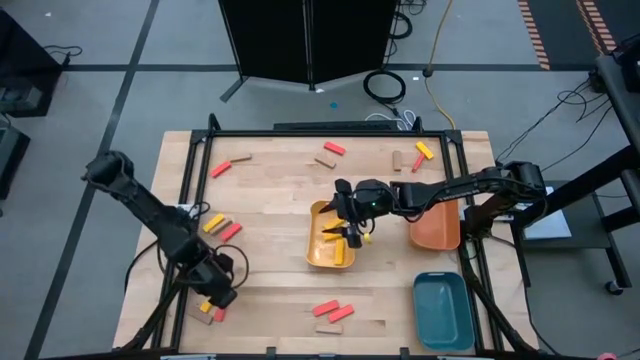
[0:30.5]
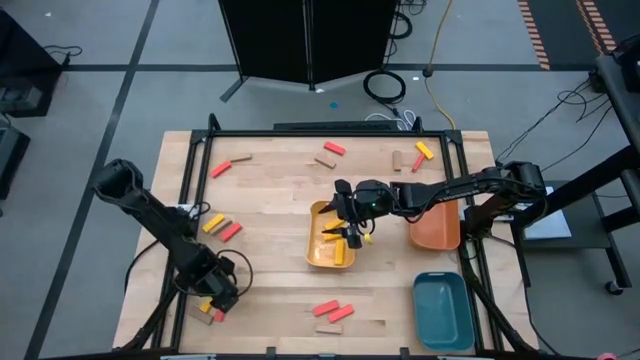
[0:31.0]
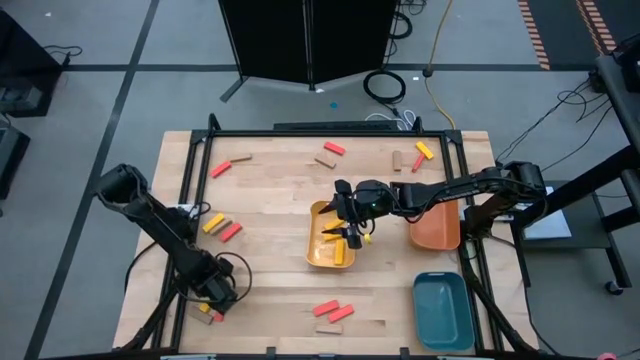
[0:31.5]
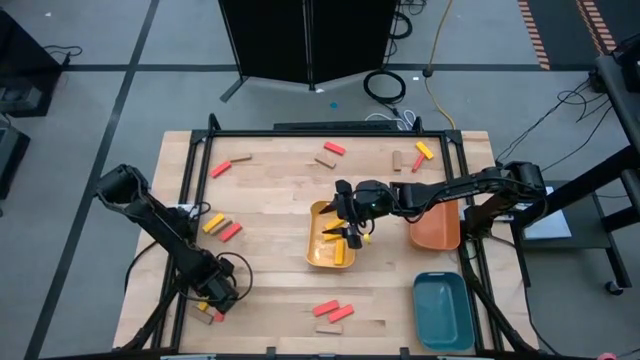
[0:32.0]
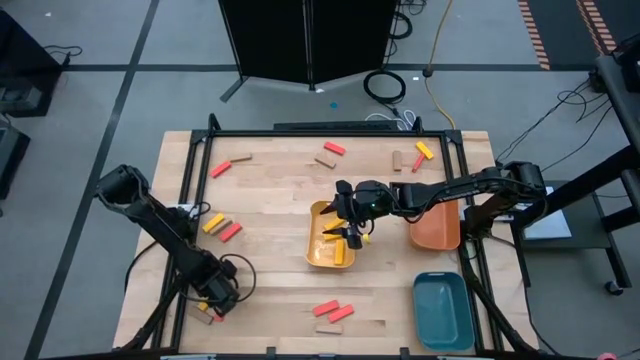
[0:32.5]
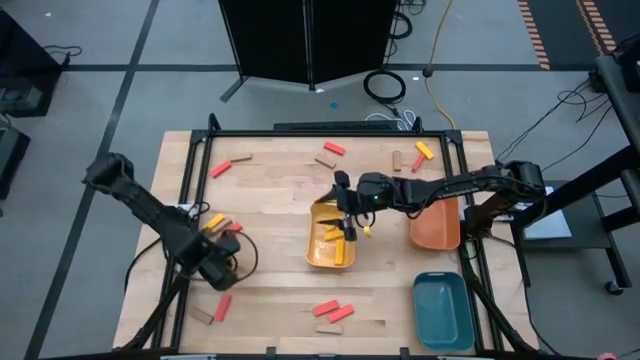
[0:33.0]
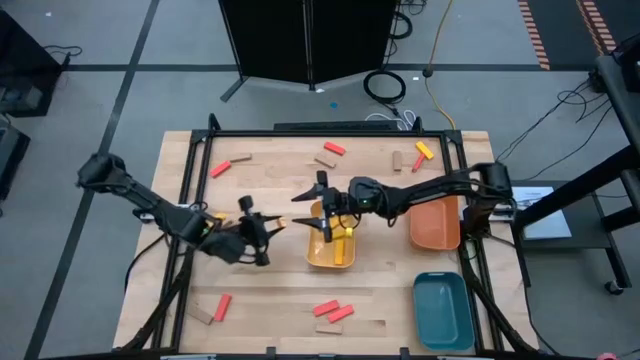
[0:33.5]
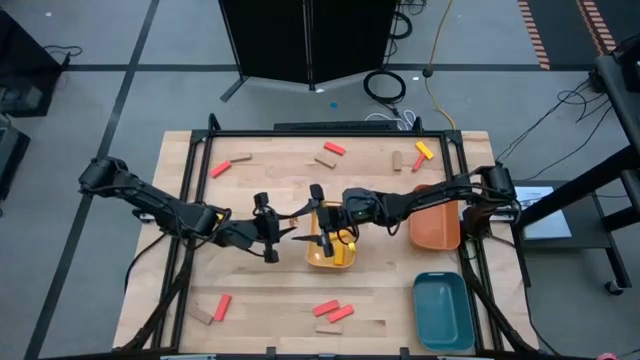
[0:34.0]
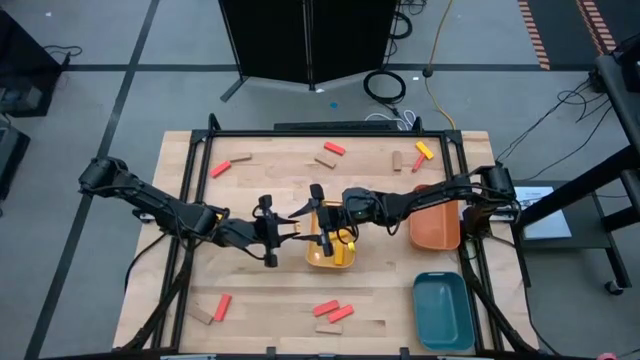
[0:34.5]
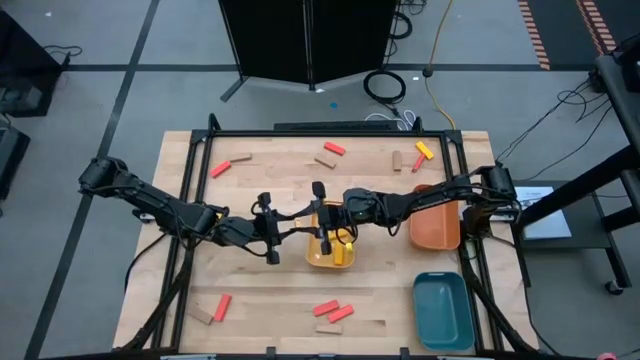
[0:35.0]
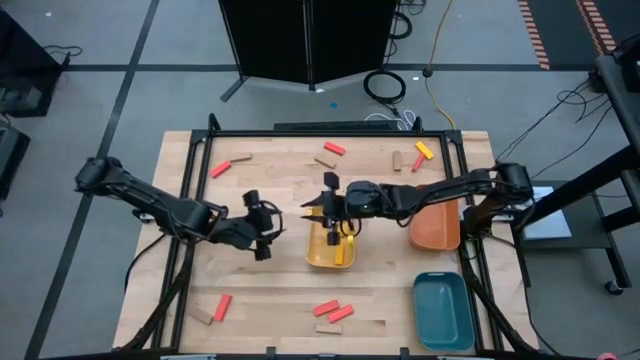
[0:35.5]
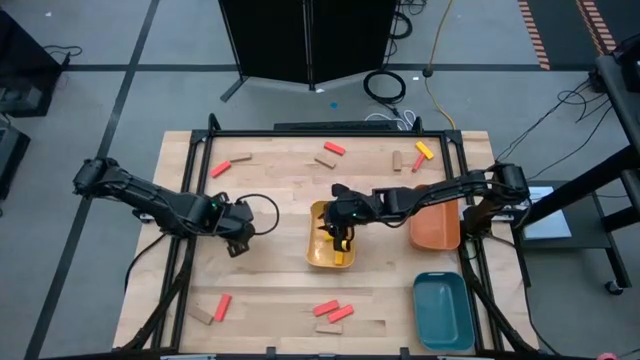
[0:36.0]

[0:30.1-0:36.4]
Task: Sort blocks
Put the yellow wooden block into the yellow bin

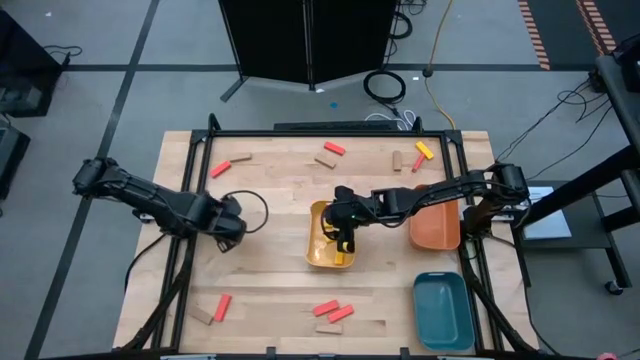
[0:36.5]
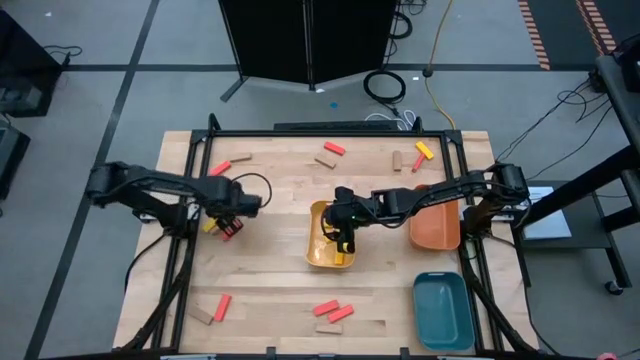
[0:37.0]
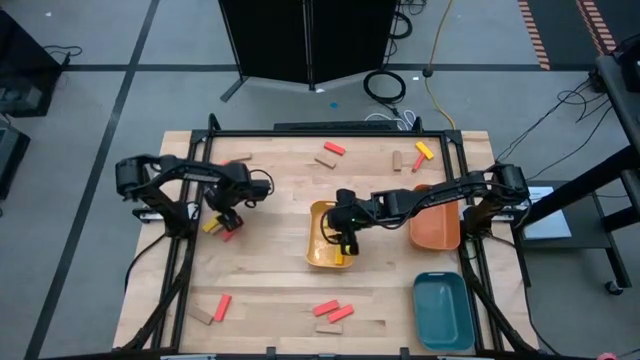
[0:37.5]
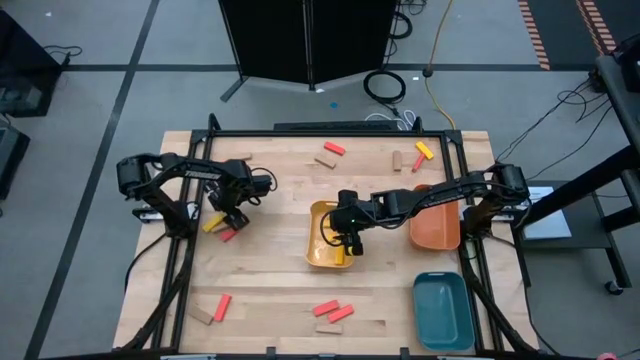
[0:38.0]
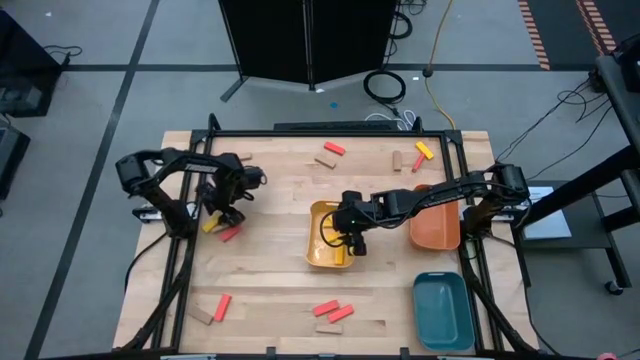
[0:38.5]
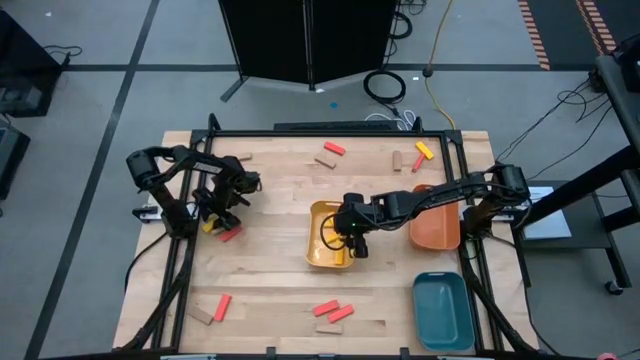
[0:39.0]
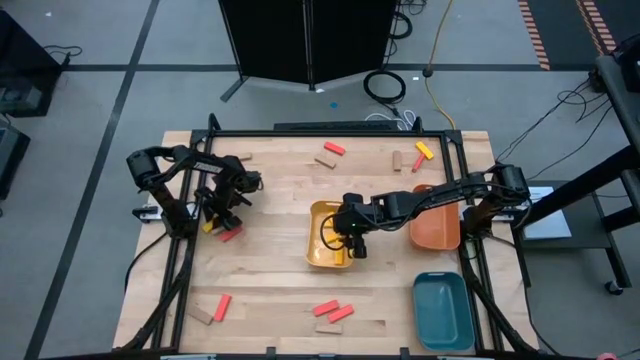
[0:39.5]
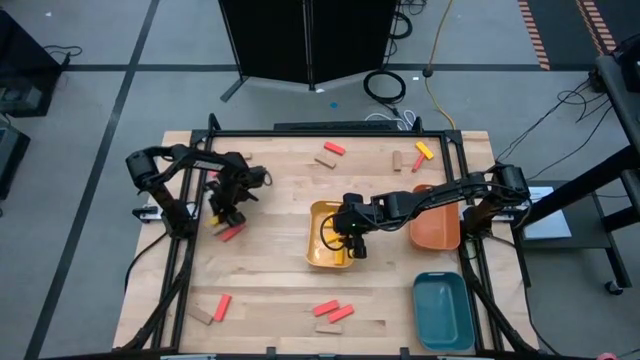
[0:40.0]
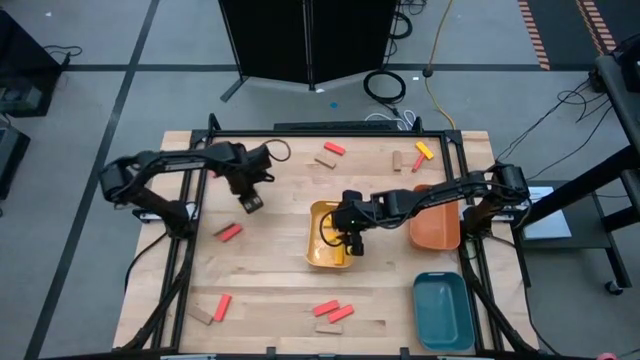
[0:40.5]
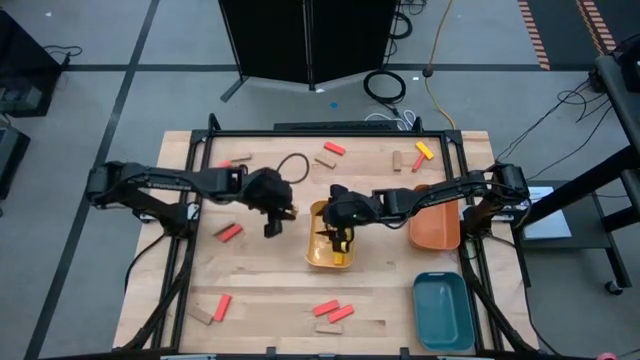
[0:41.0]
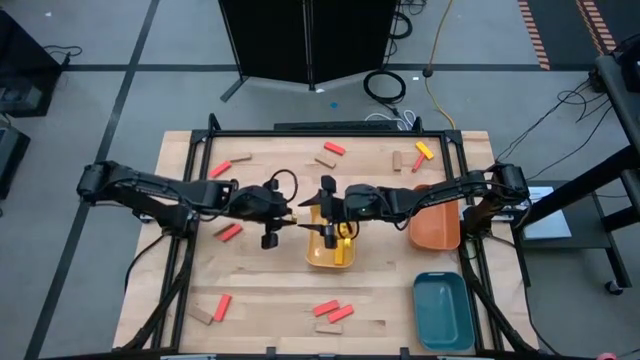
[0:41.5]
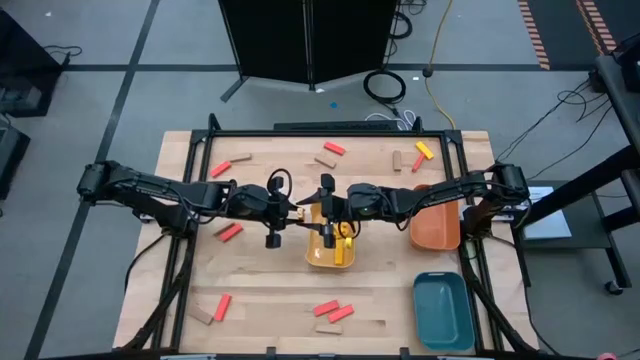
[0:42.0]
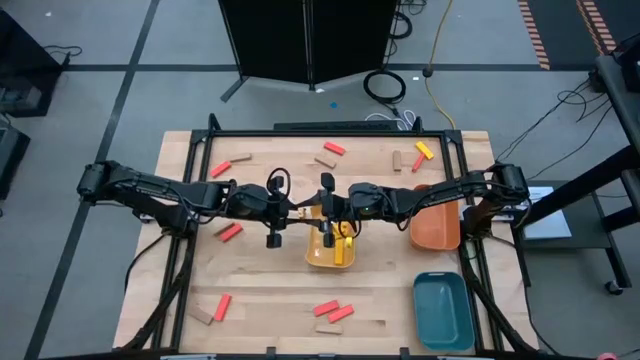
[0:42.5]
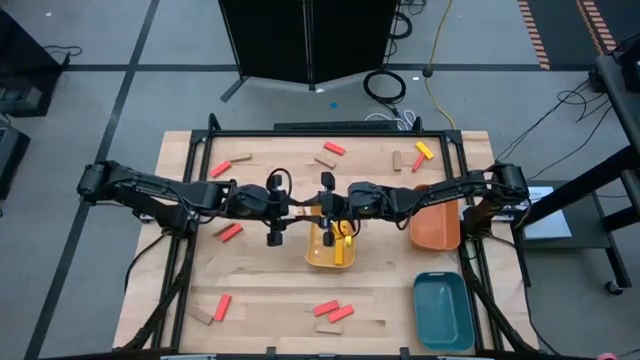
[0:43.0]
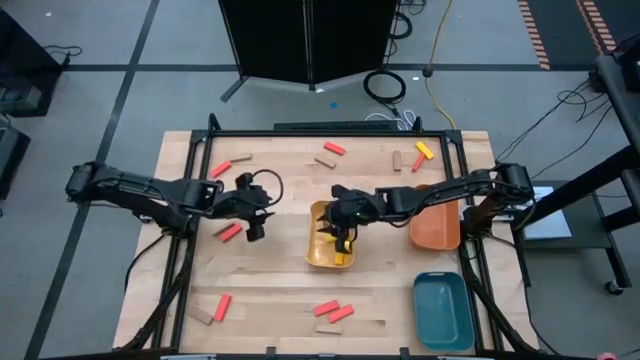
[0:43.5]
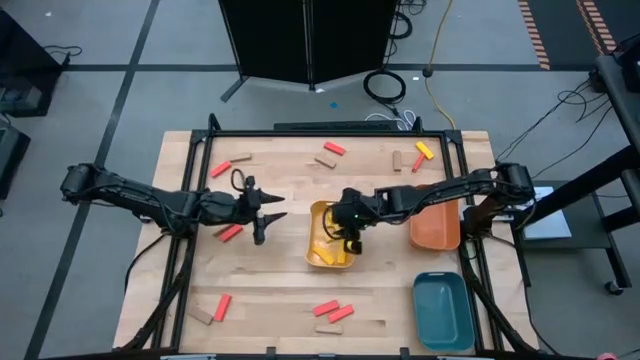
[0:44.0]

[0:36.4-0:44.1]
Put the yellow wooden block into the yellow bin

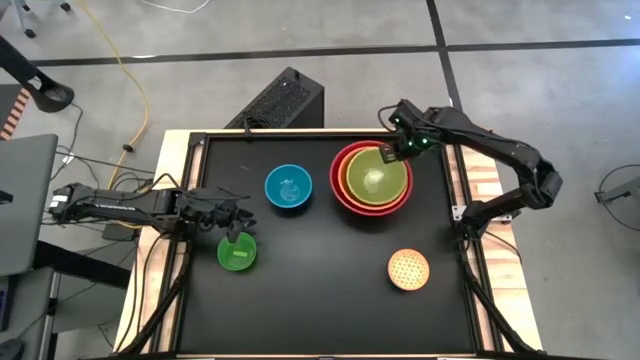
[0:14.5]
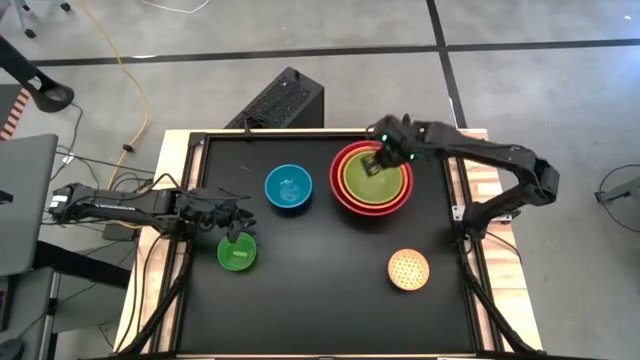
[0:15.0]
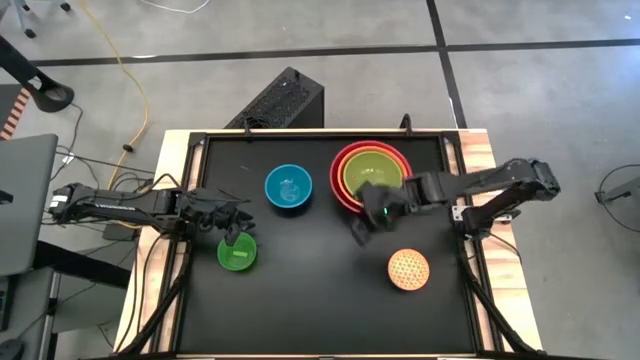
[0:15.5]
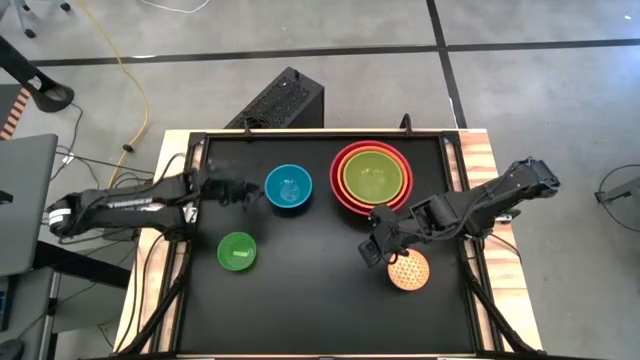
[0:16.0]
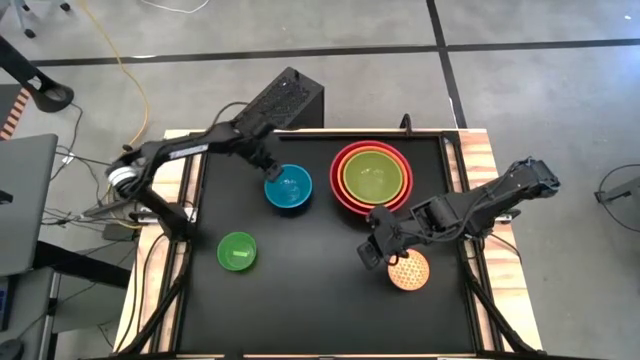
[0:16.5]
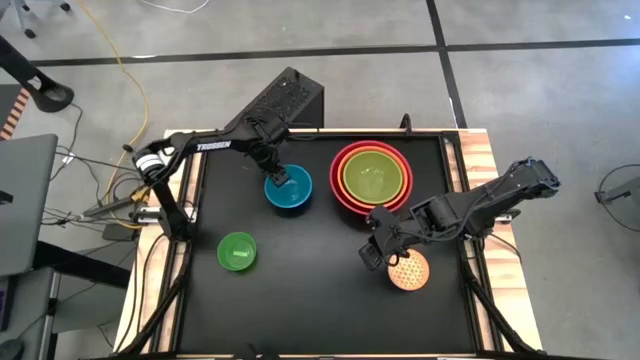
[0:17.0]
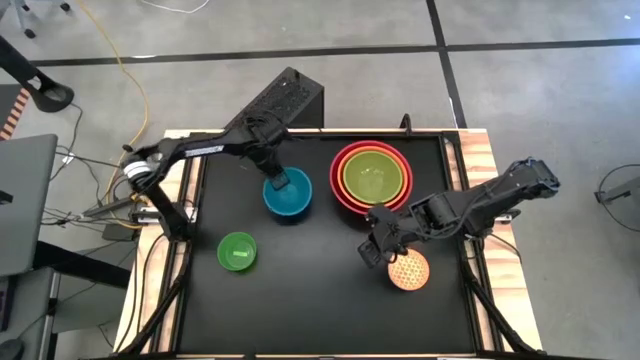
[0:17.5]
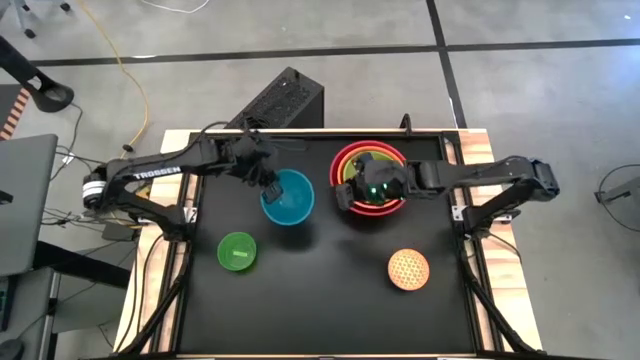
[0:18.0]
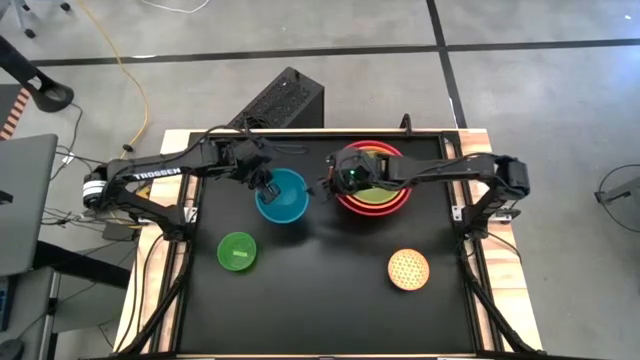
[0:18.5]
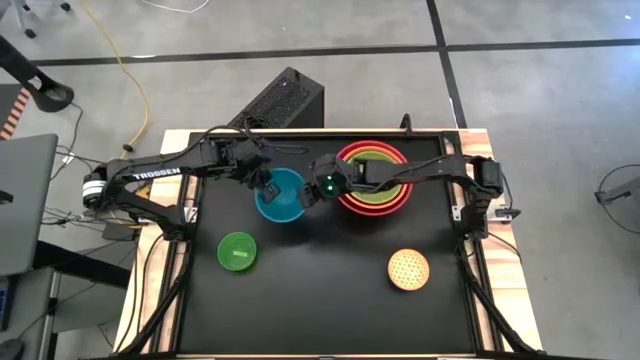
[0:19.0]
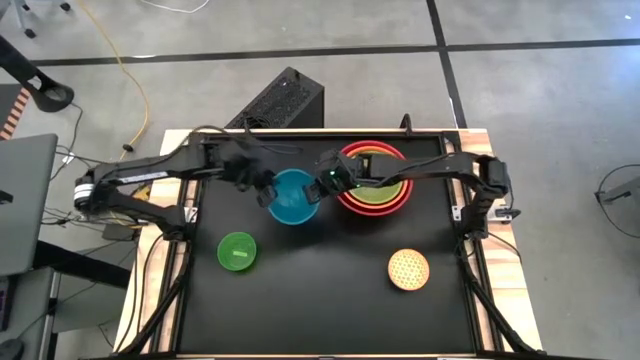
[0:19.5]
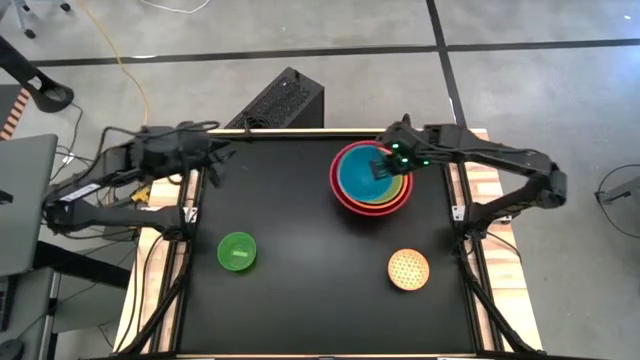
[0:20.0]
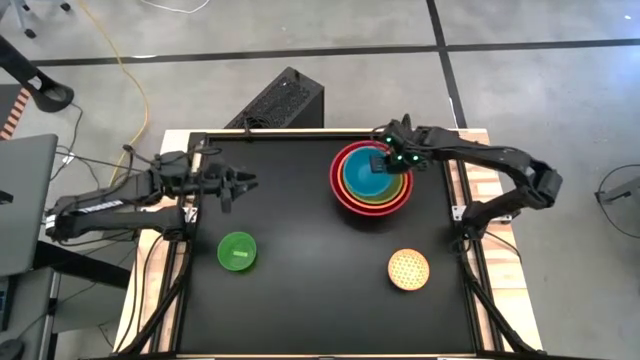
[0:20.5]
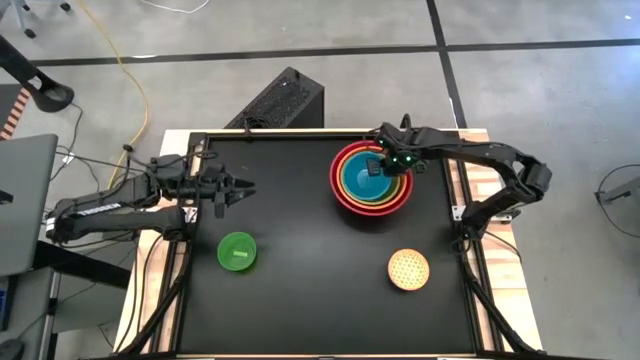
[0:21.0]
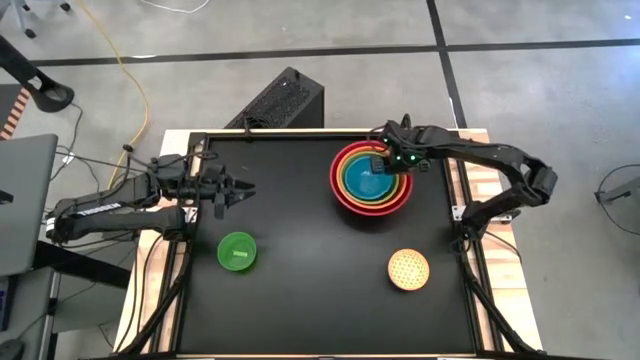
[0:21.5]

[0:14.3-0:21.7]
Task: Nest bowls inside each other by size order
Stack the blue bowl on top of the green bowl
